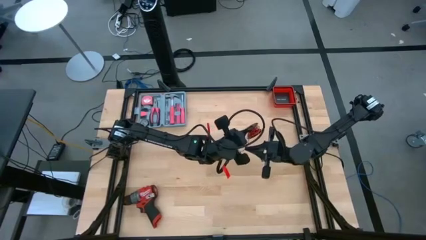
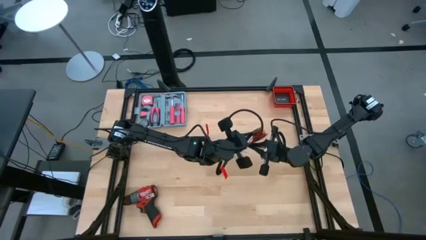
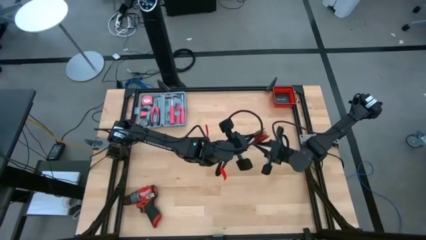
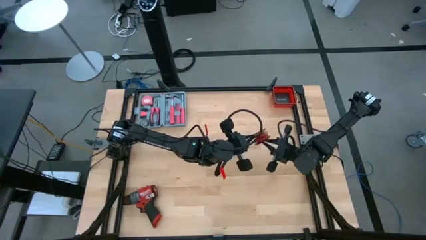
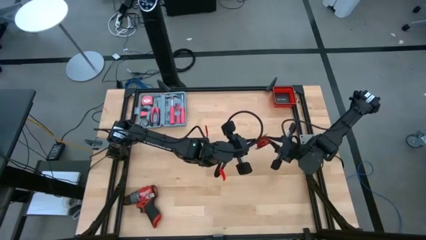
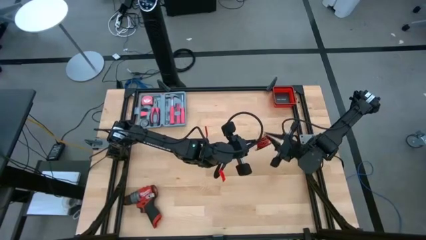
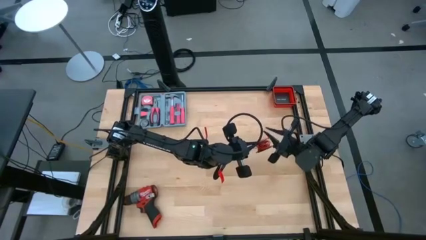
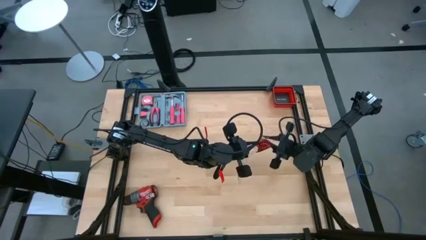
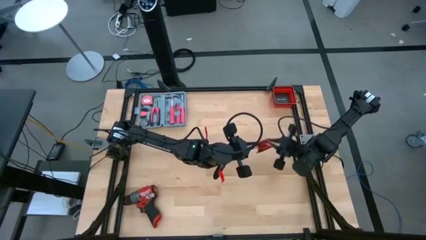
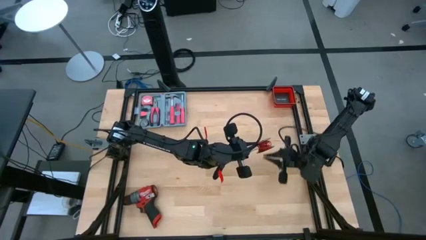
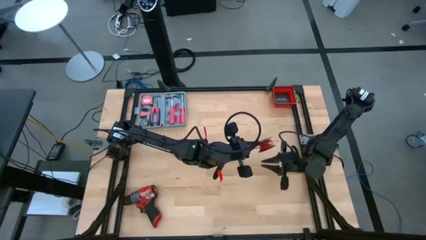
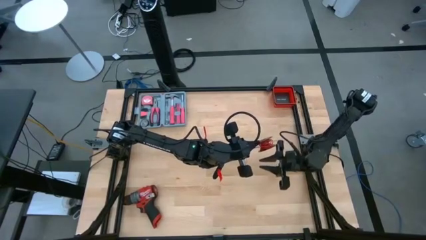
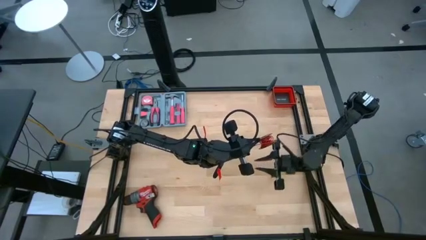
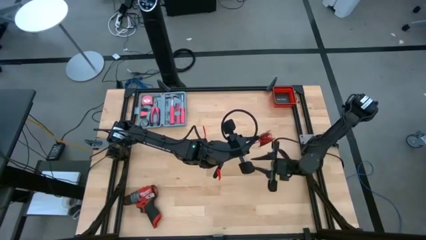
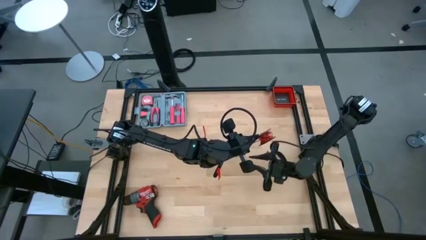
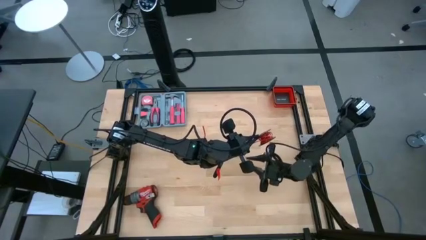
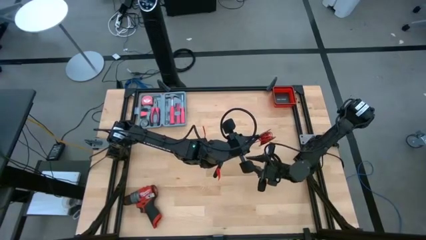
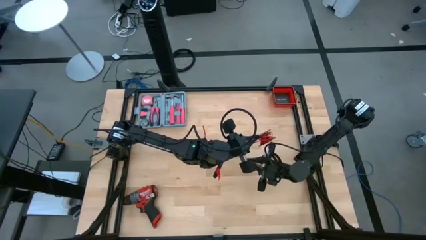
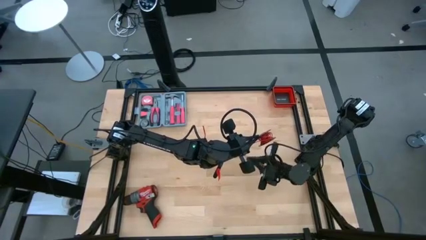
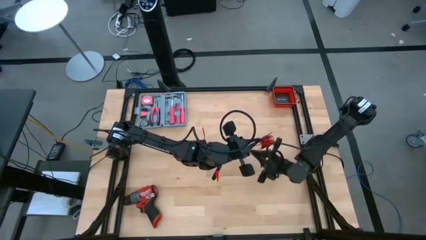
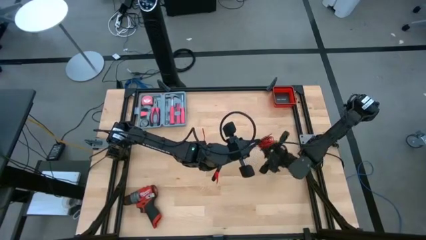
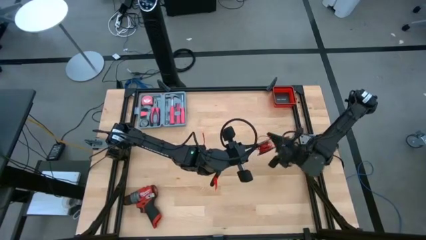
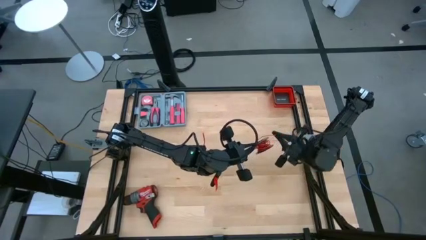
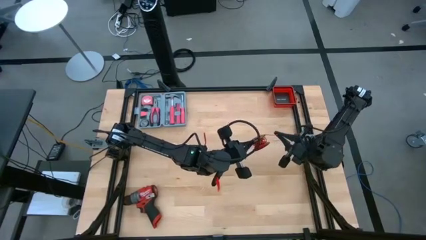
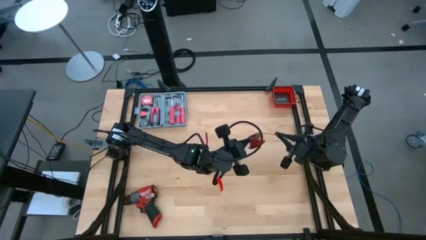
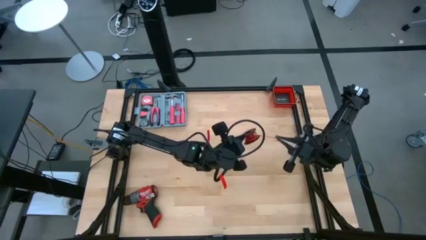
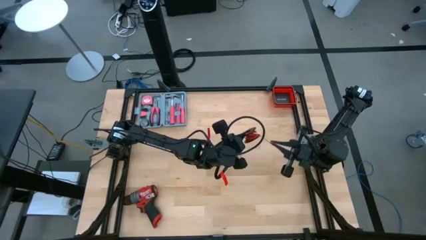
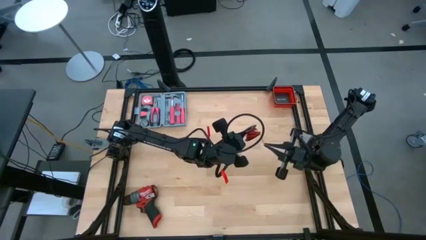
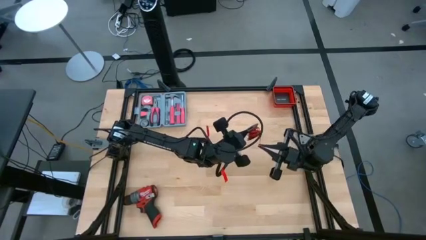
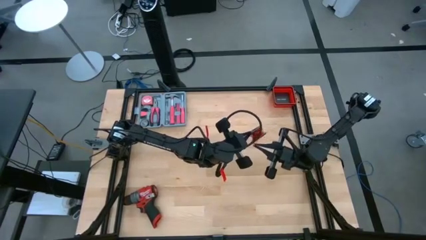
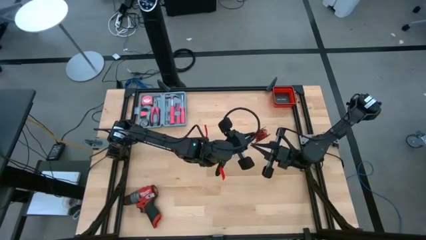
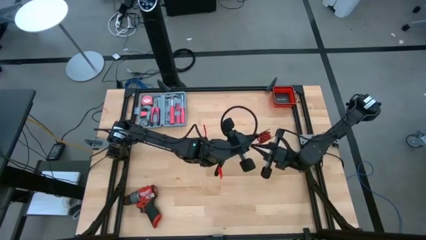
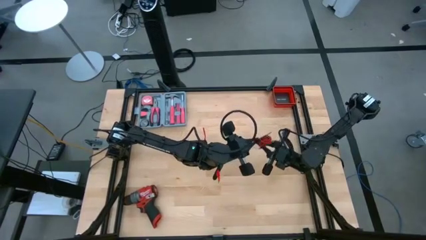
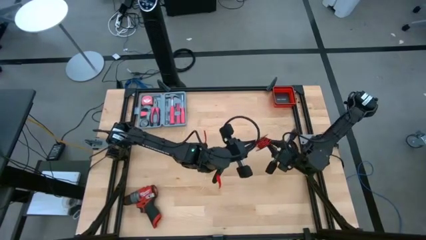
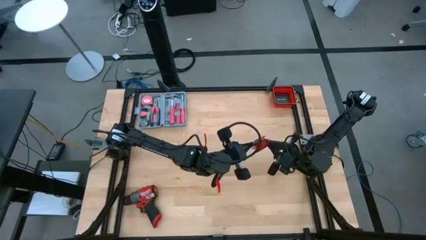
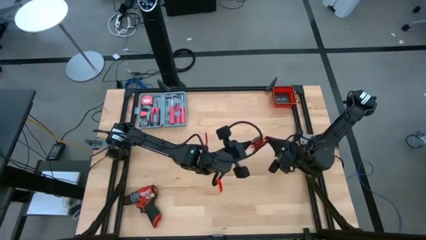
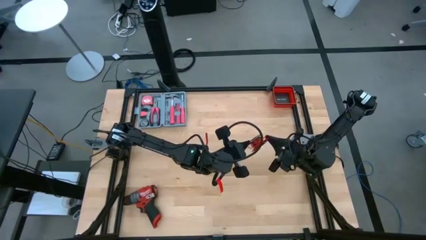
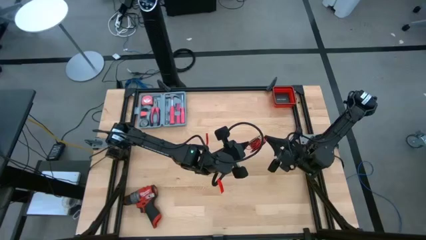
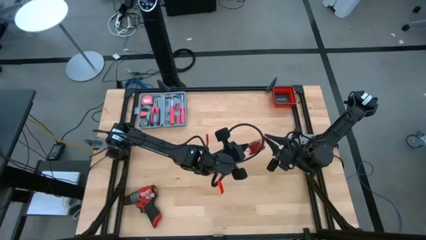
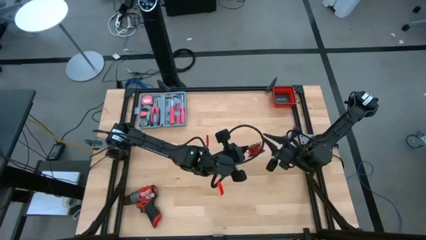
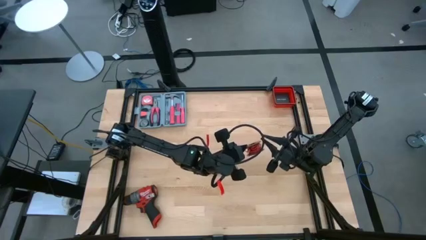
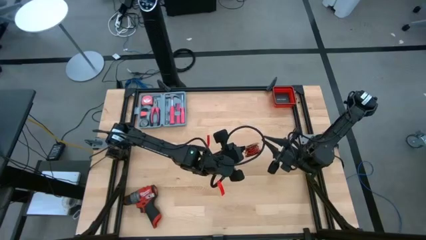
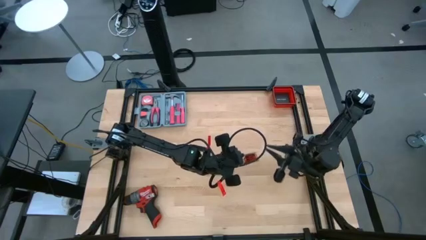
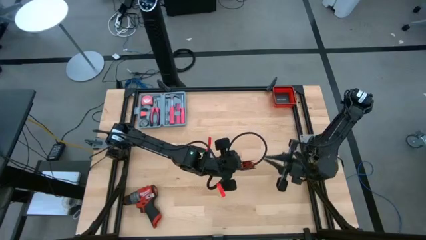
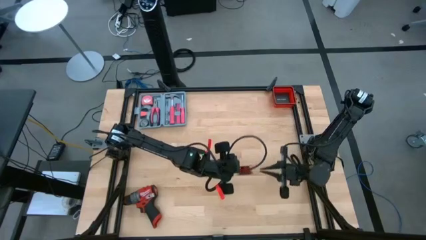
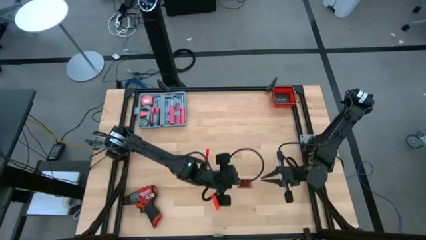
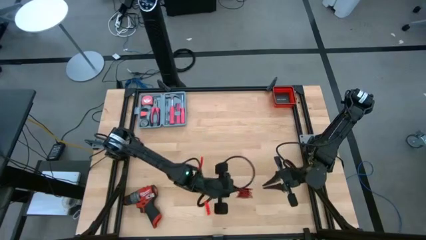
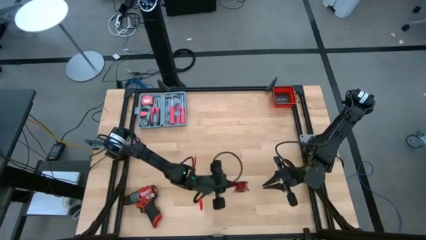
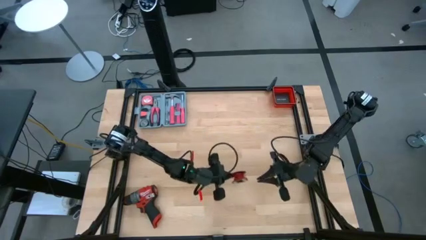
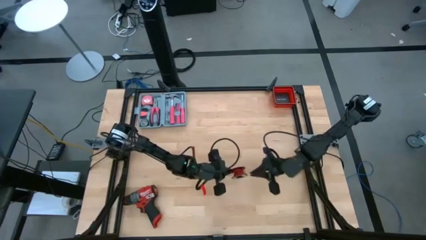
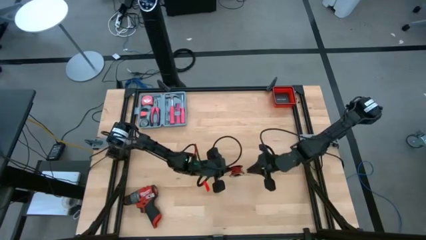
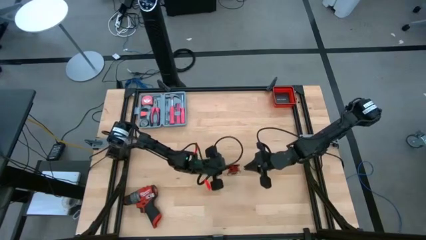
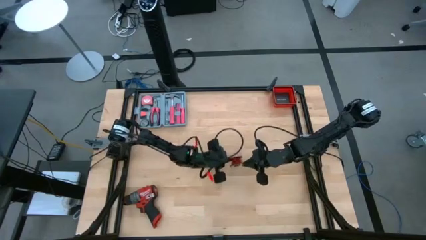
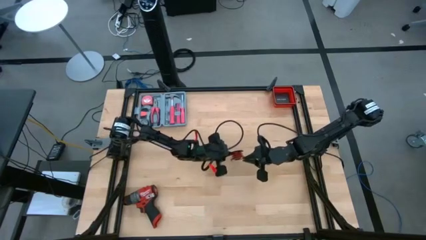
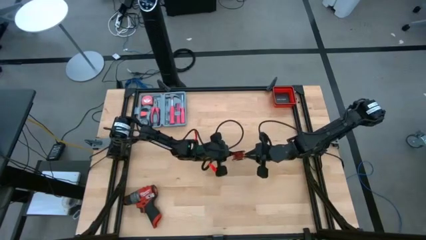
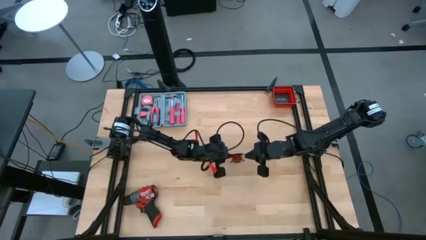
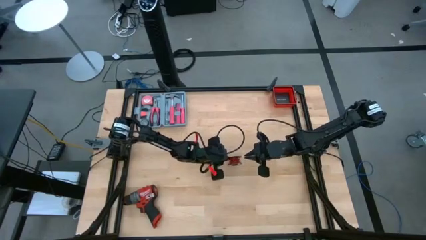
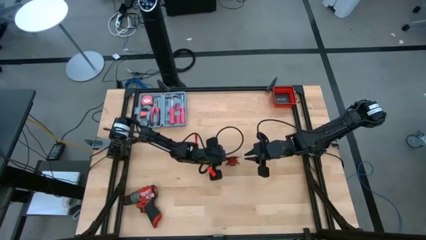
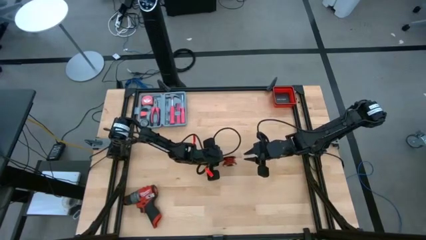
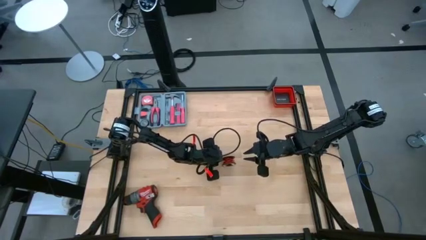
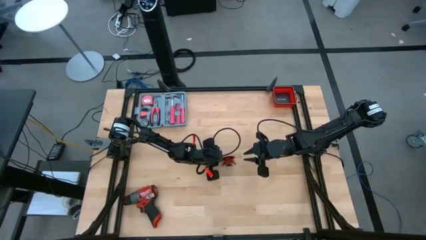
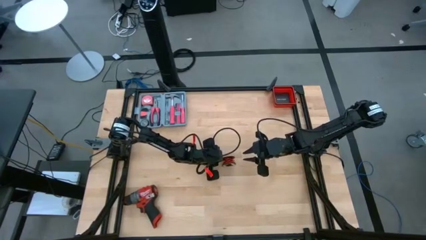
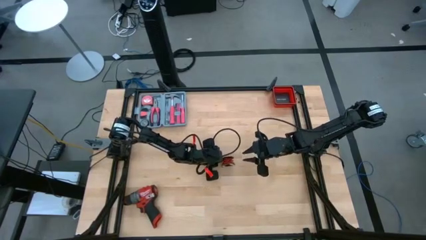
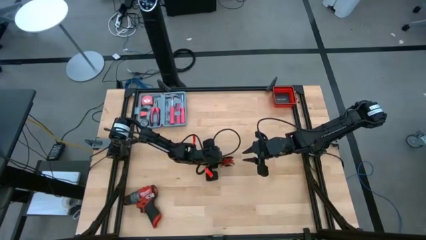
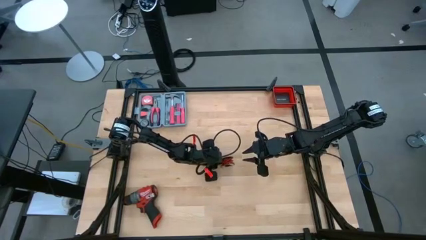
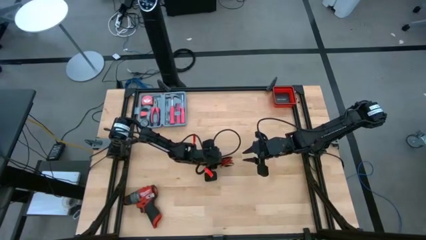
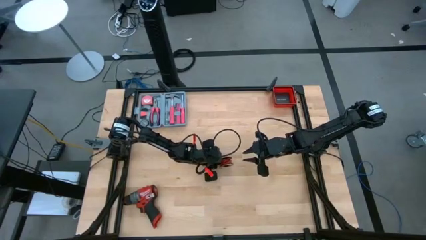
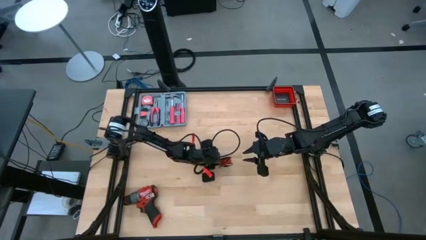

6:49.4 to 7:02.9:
Task: Coil cords
Coil the red wire onto the spool
